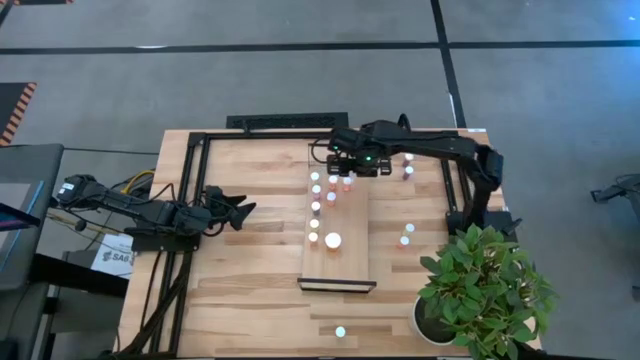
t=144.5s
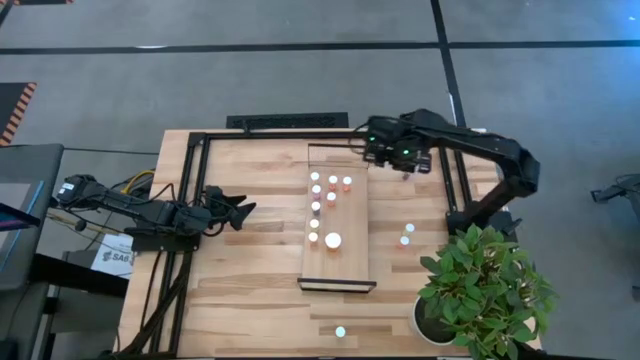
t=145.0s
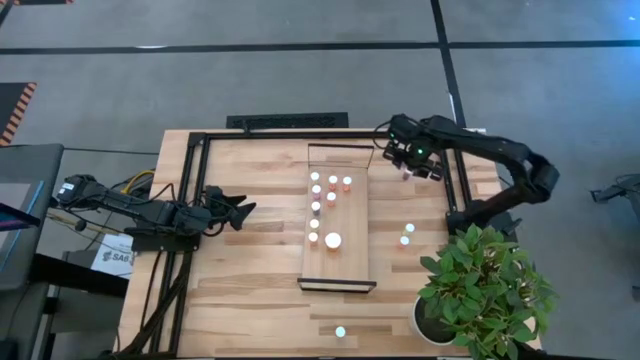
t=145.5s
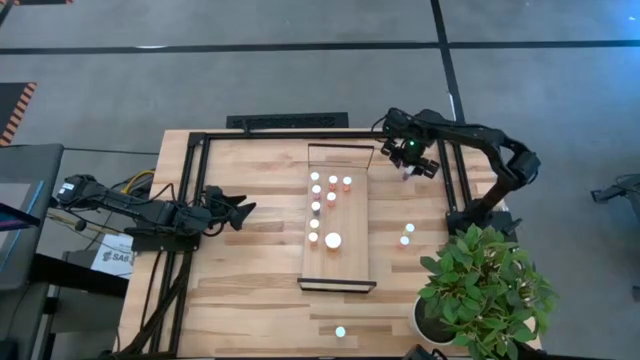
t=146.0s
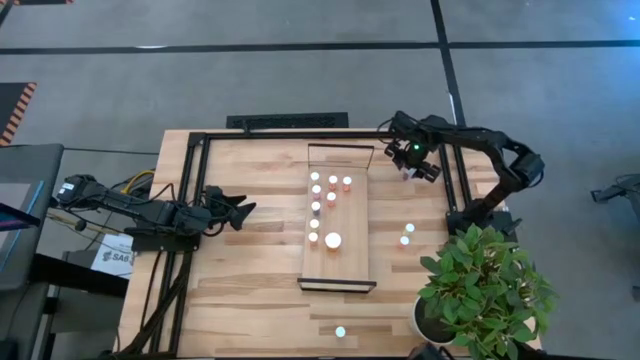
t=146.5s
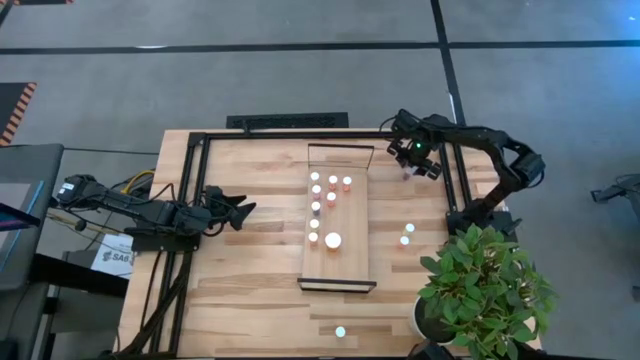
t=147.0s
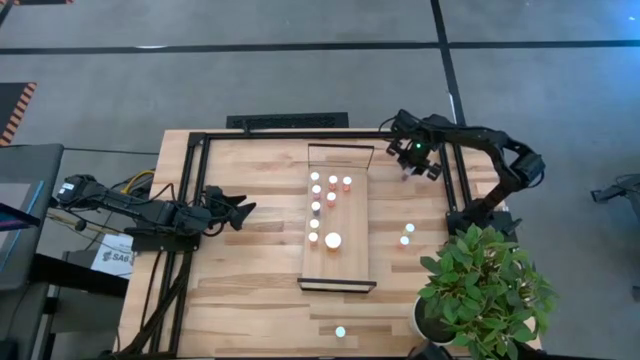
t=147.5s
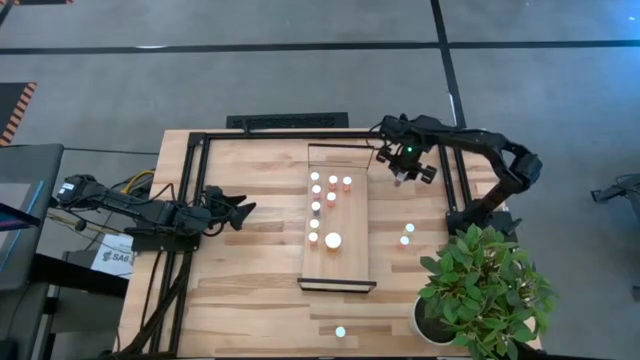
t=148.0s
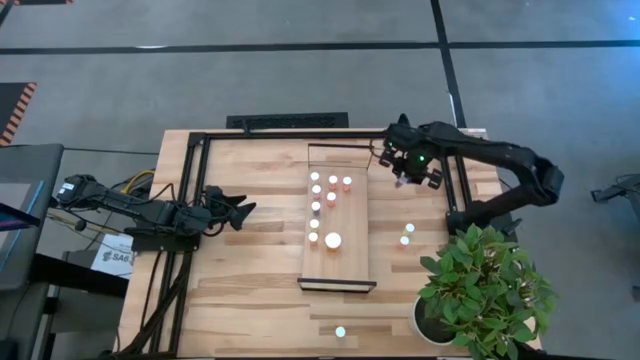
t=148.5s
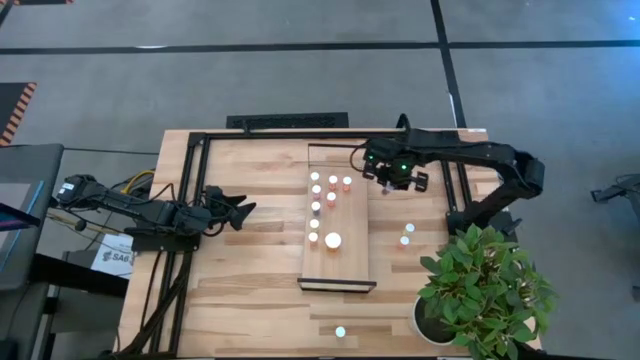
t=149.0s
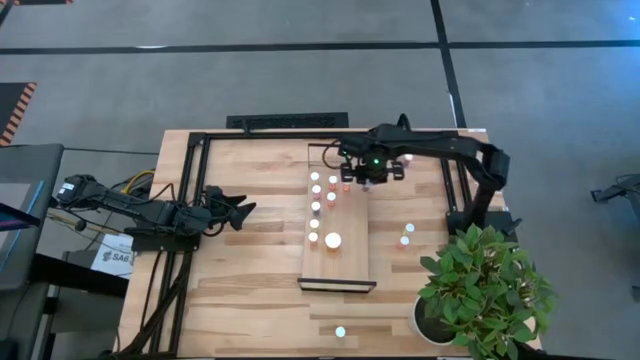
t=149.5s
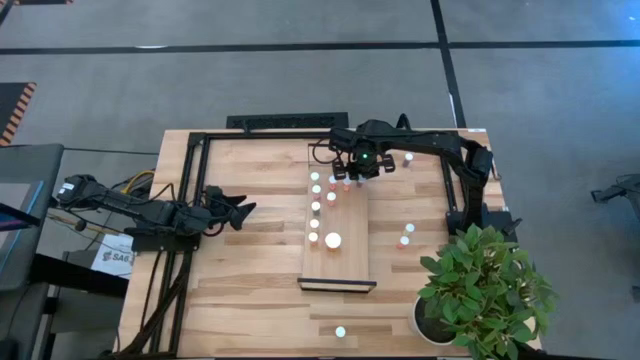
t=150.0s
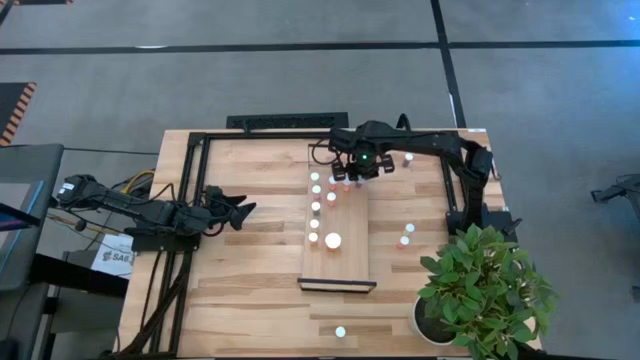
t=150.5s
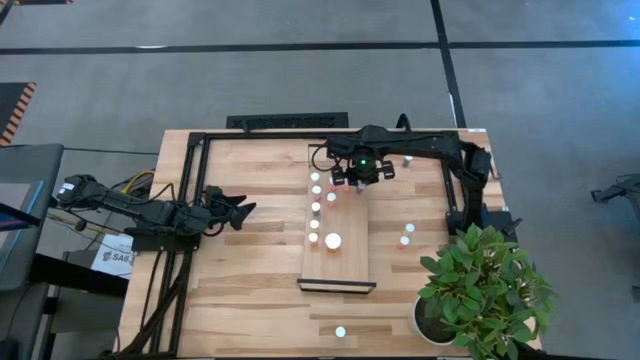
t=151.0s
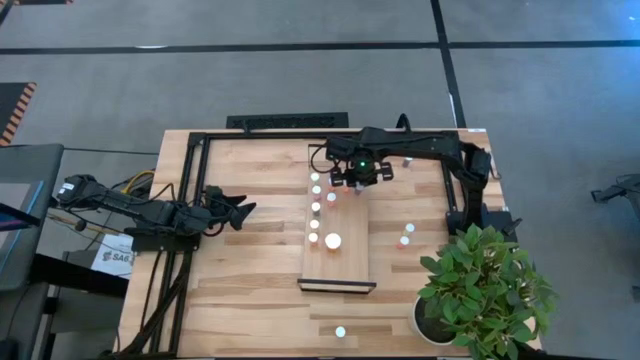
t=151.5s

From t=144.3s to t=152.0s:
Task: Pick and place medicine bottles onto shelf by color
Put the blue pill bottle on the shelf

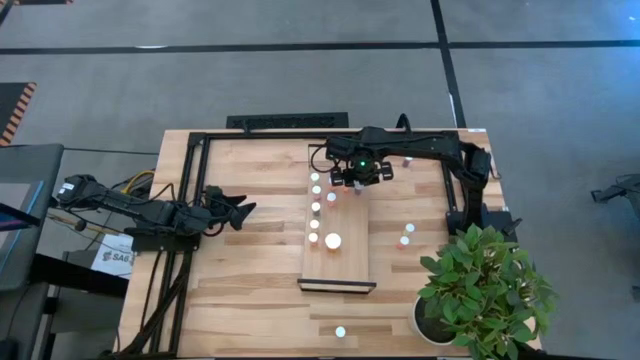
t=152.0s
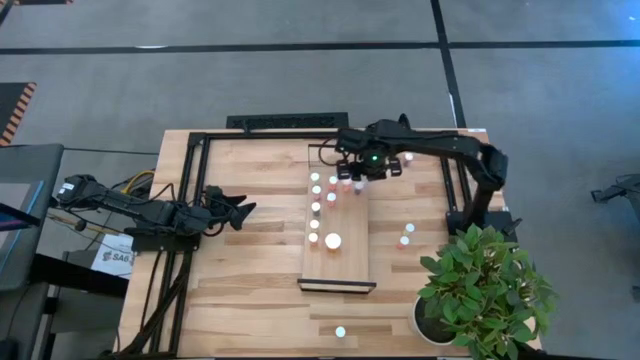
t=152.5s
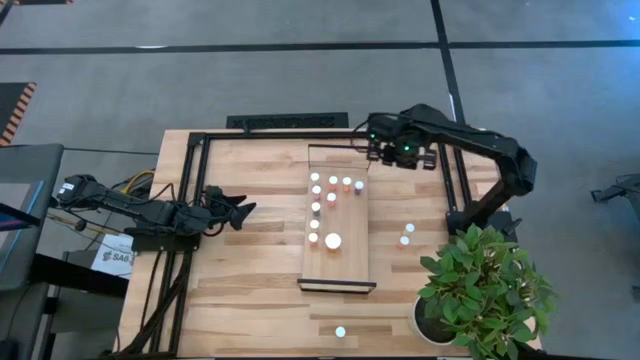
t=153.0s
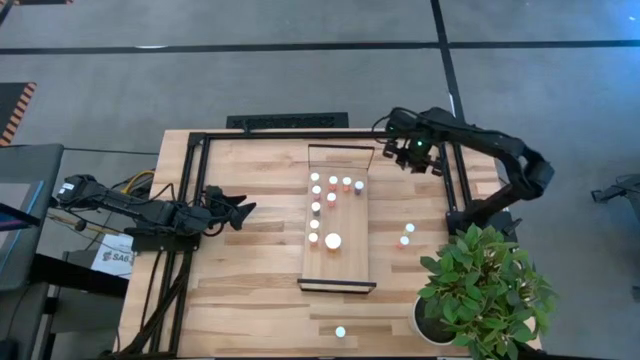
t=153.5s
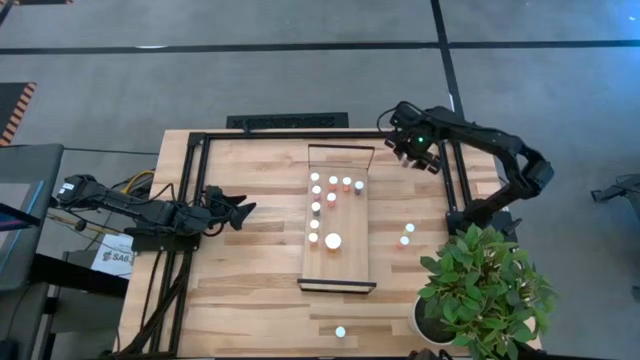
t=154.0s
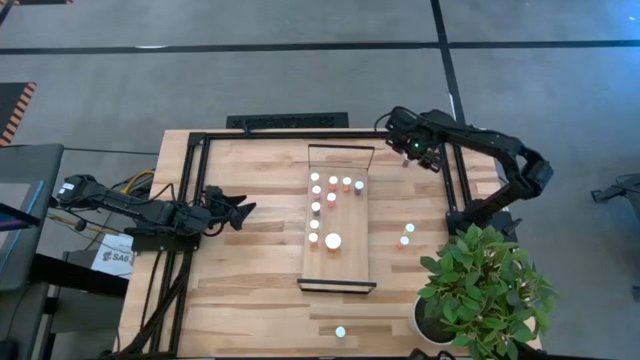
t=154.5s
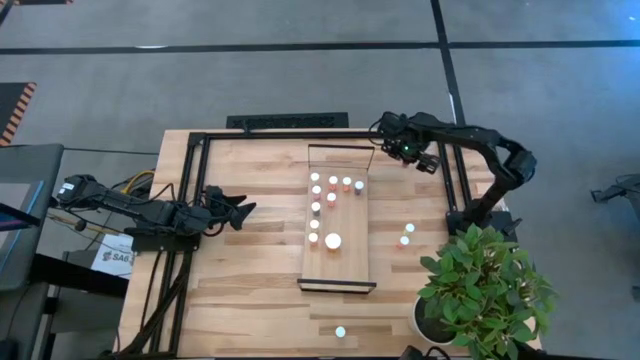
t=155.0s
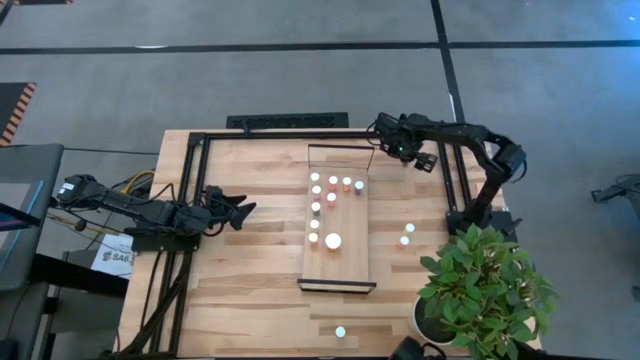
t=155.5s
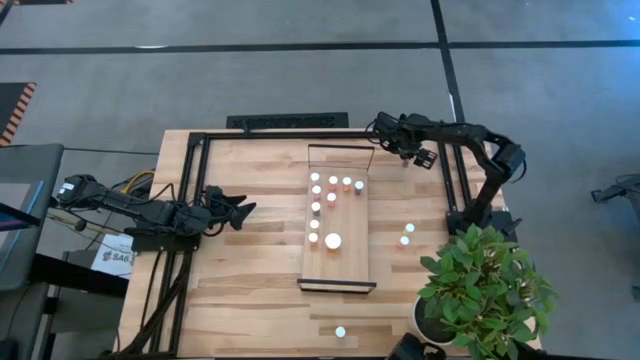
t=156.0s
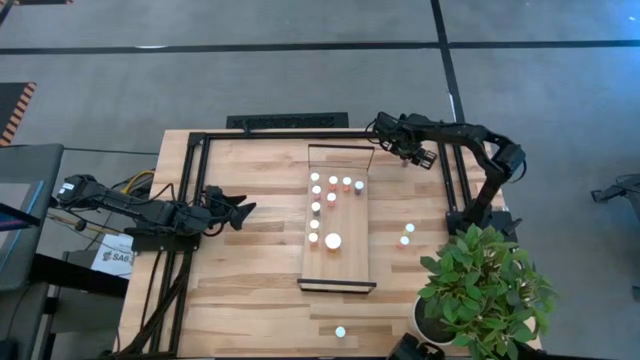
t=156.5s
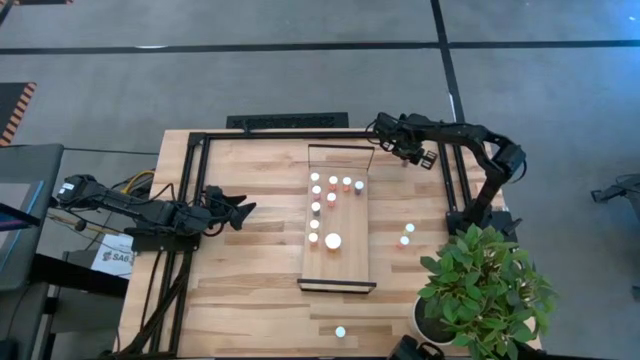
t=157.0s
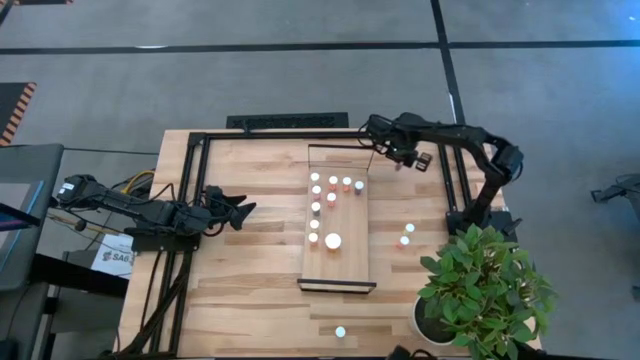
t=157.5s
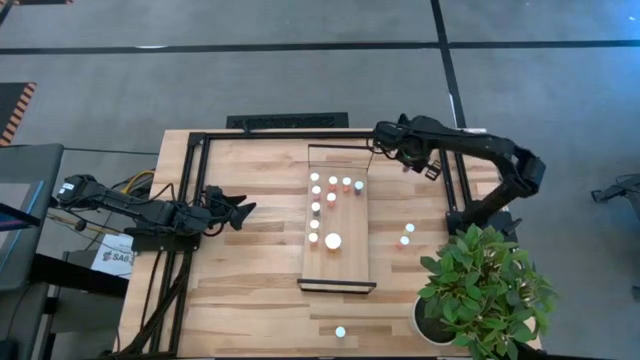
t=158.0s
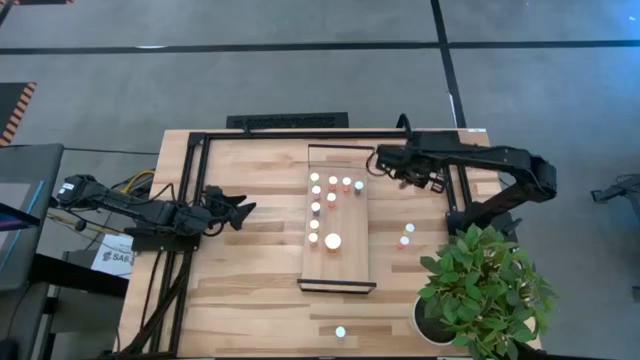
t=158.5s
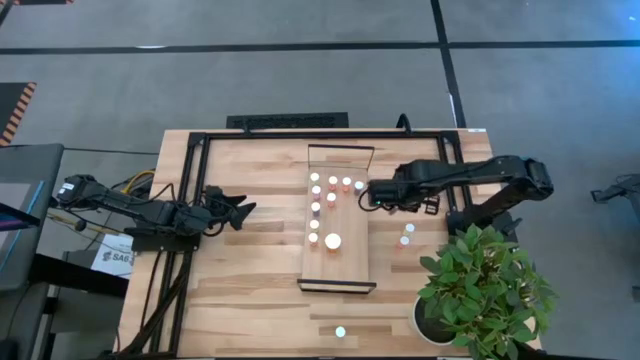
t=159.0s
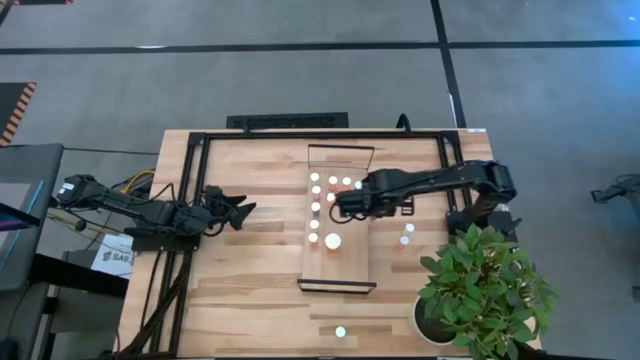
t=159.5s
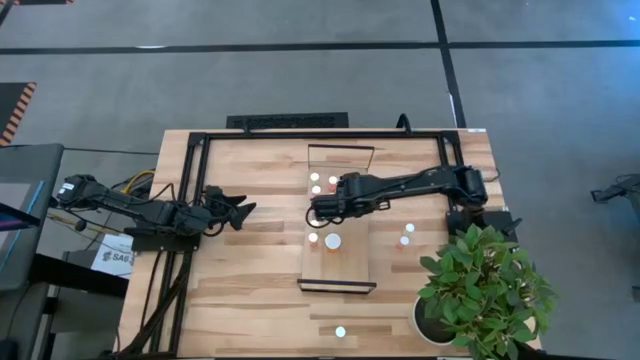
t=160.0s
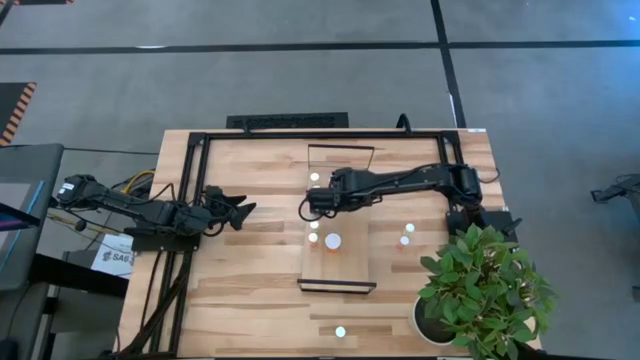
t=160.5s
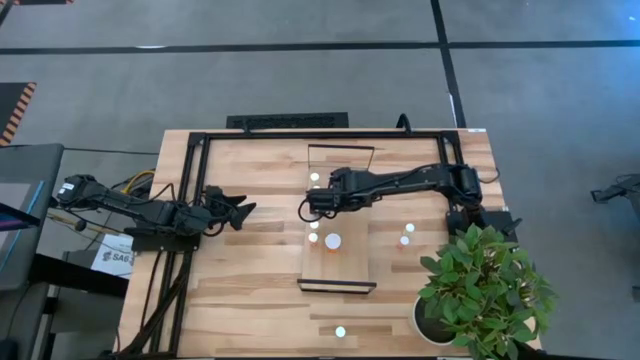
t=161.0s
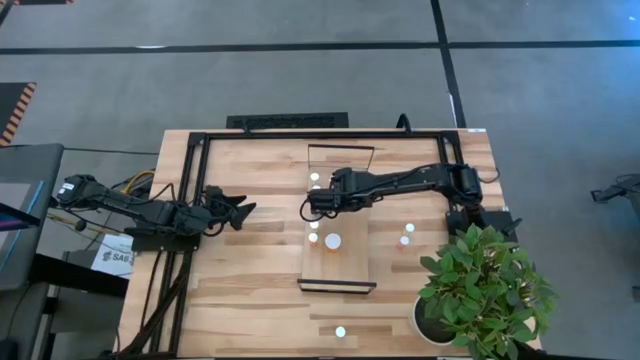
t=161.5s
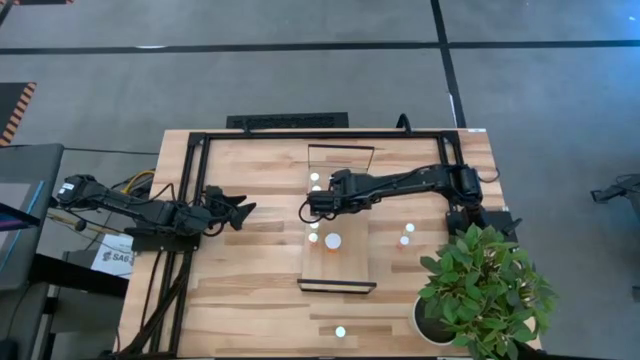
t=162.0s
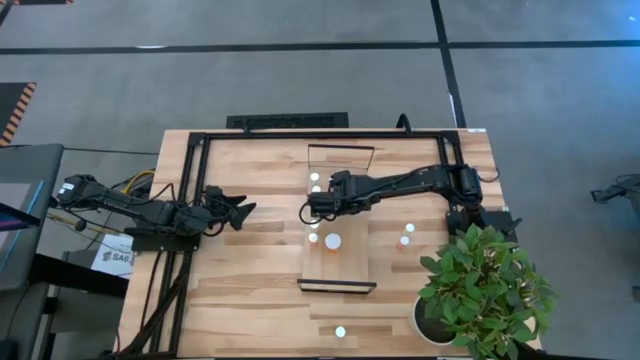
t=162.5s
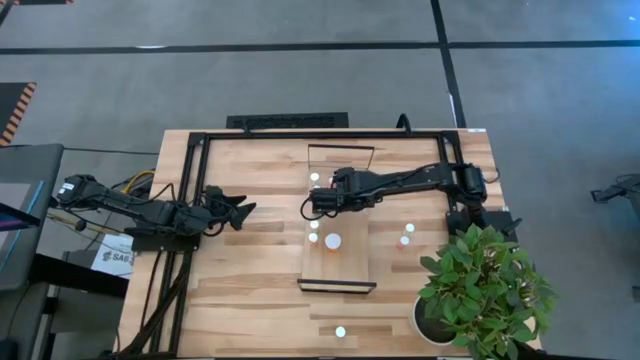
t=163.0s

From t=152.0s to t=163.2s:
Put the blue pill bottle on the shelf

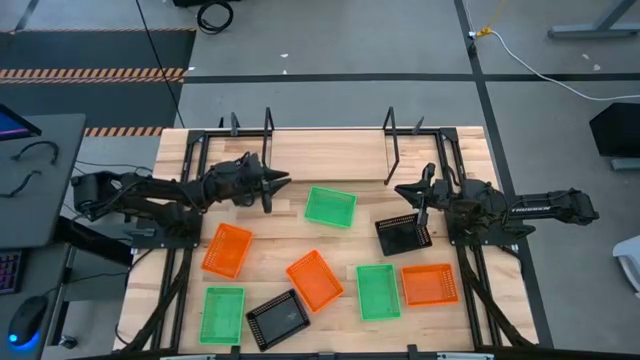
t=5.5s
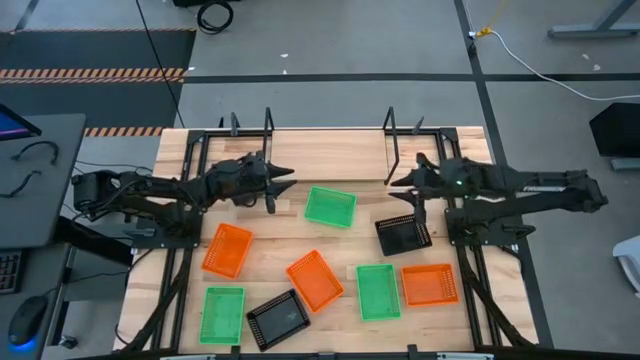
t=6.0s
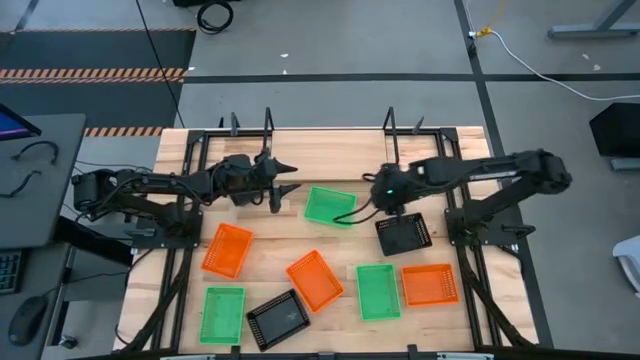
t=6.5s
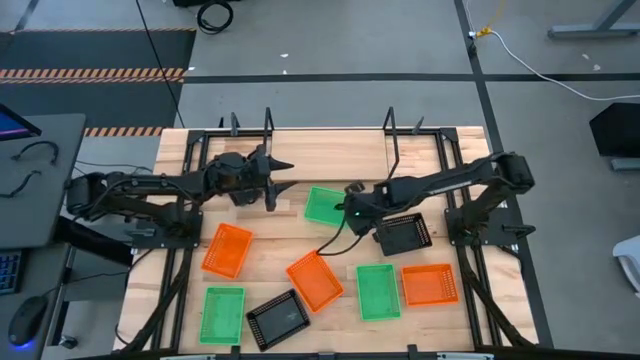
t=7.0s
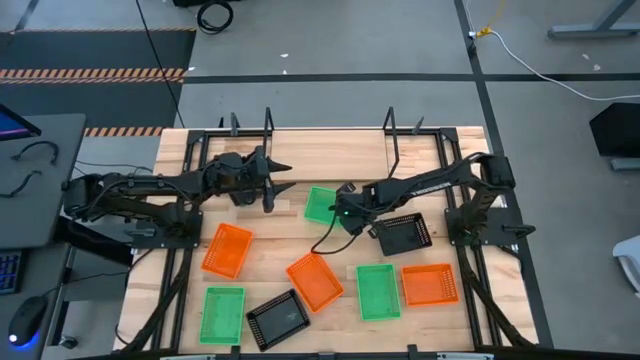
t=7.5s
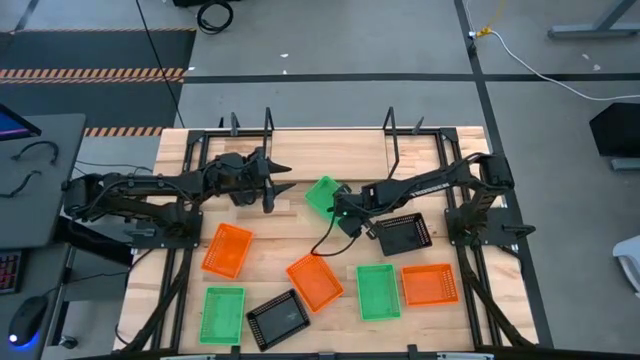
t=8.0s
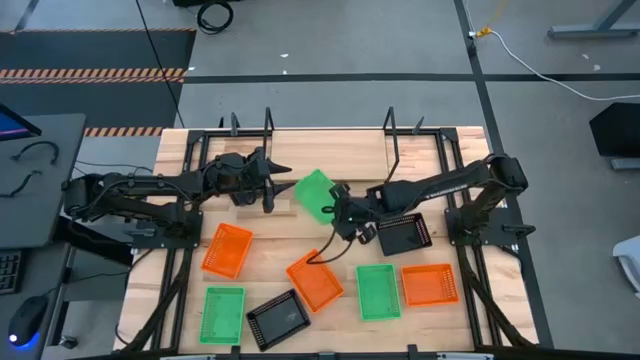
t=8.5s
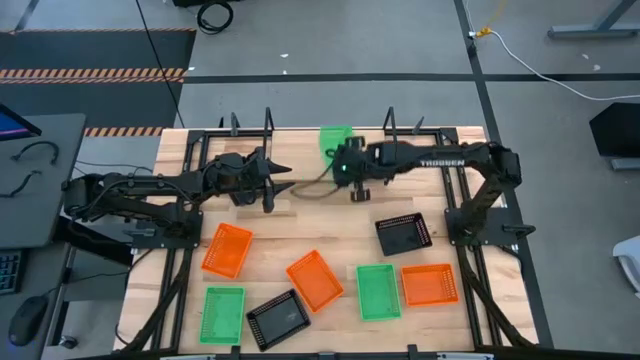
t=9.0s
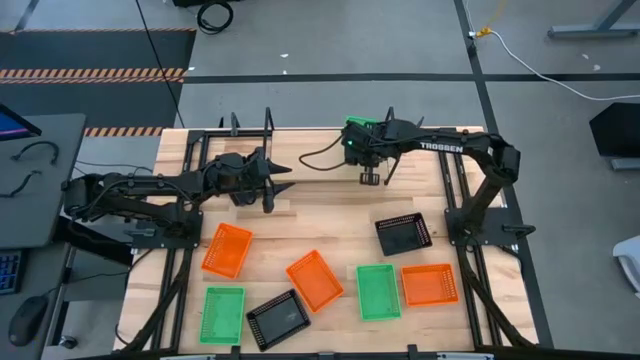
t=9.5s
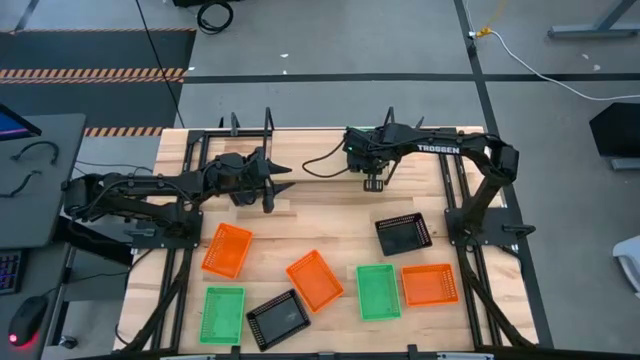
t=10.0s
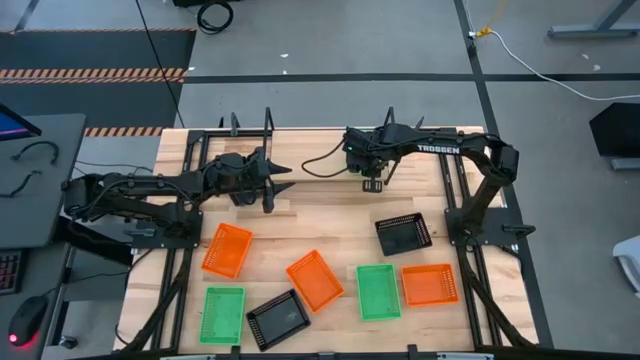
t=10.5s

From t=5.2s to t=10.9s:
Task: Stack baskets on shelf by color
Put the top green bin on the shelf
